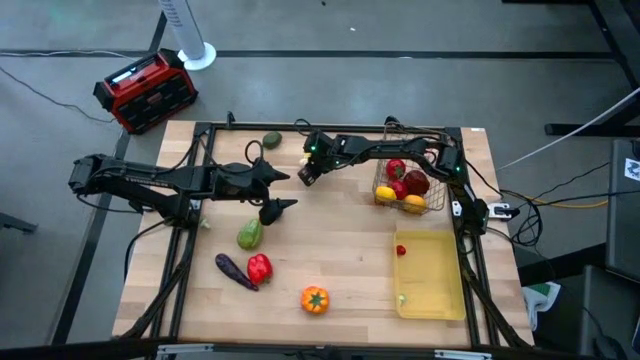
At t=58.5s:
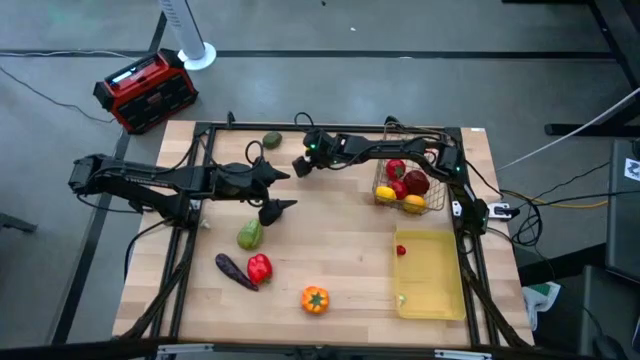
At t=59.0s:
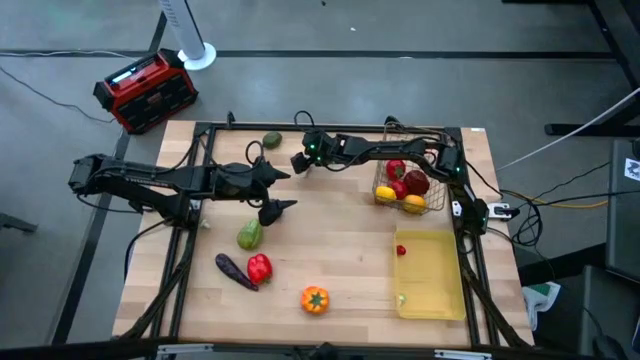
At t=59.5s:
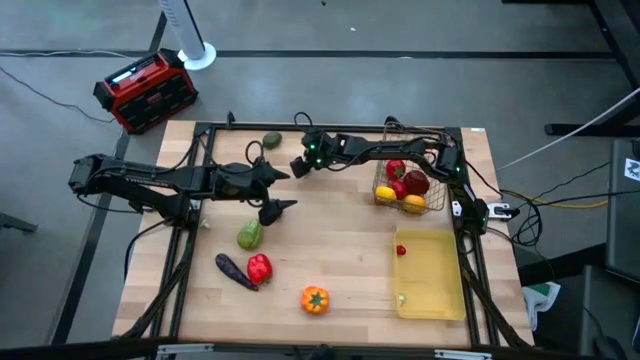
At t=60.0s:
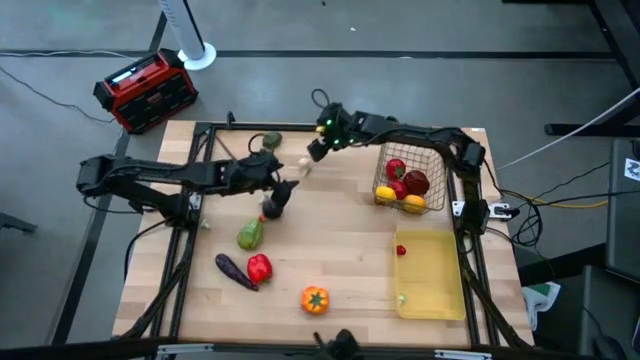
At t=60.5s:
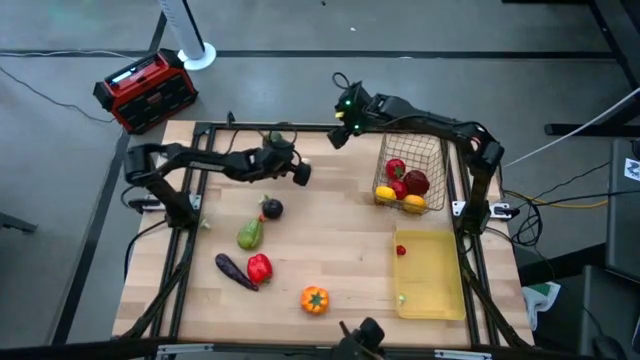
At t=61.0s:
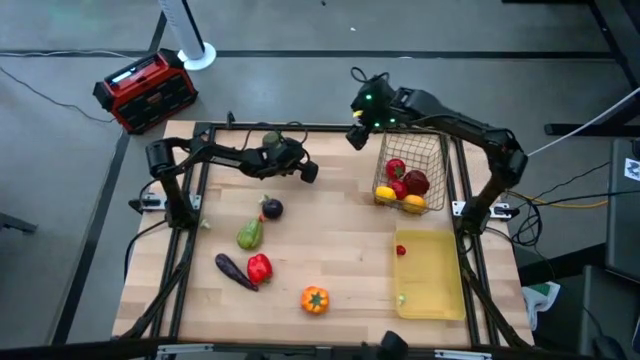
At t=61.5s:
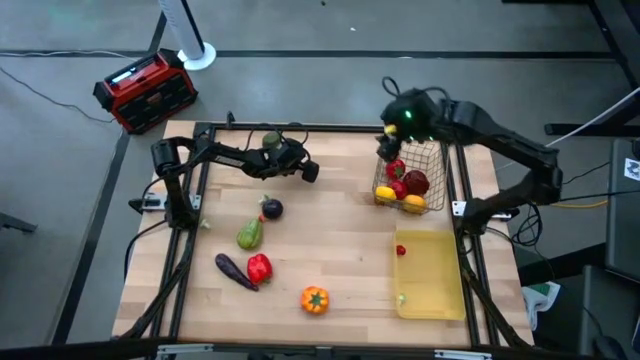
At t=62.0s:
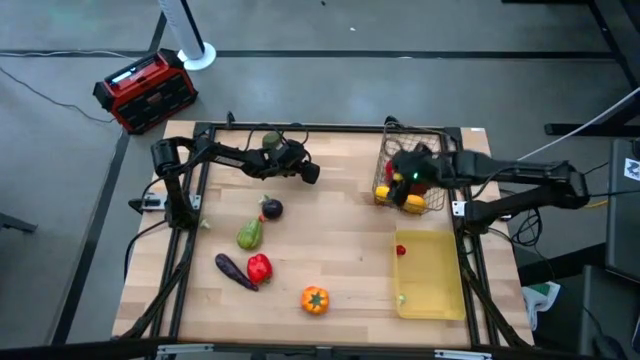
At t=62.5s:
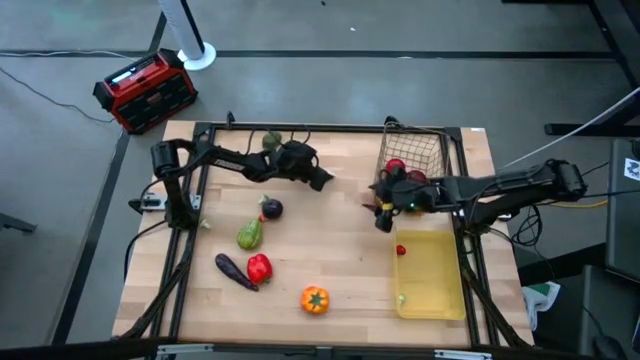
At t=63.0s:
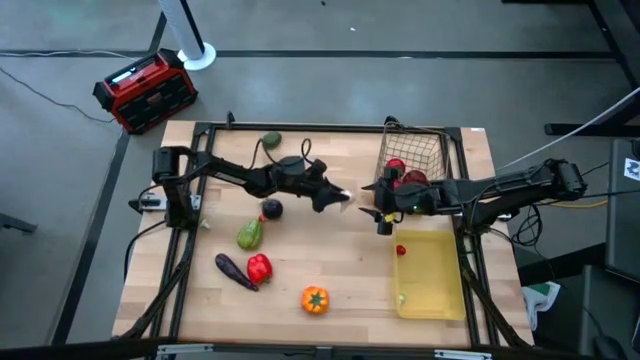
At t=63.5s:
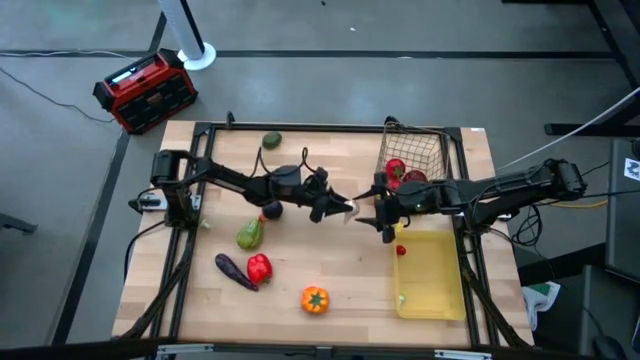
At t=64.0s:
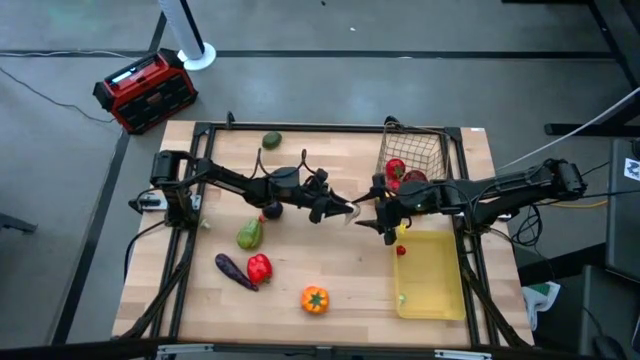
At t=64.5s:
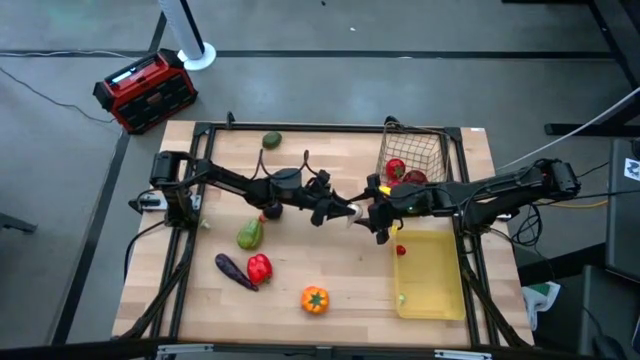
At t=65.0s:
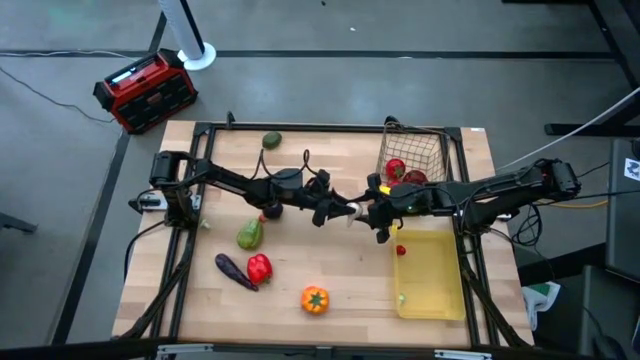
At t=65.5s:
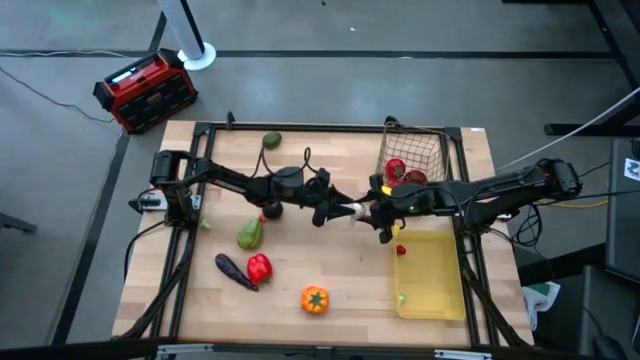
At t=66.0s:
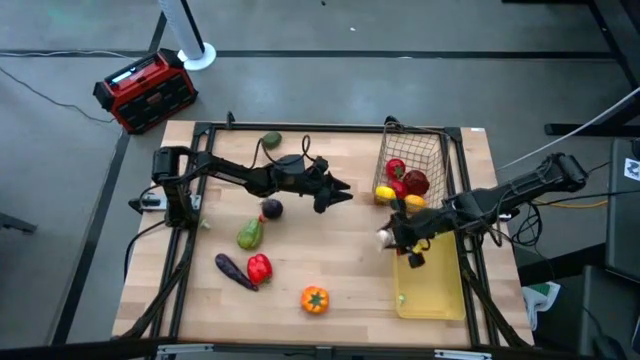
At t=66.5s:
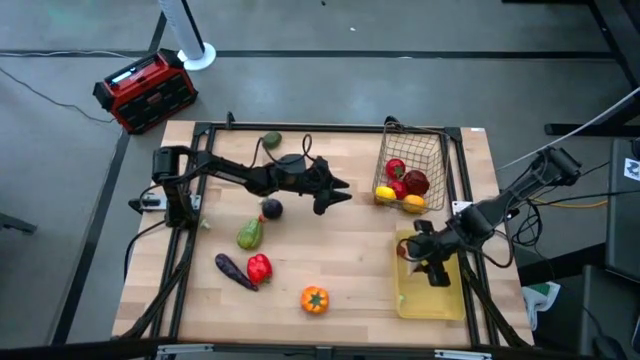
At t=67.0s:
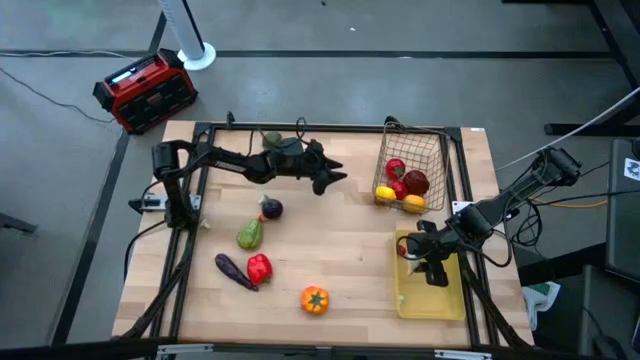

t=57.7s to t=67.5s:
Task: Sort produce into baskets
Put the garlic into the yellow bin

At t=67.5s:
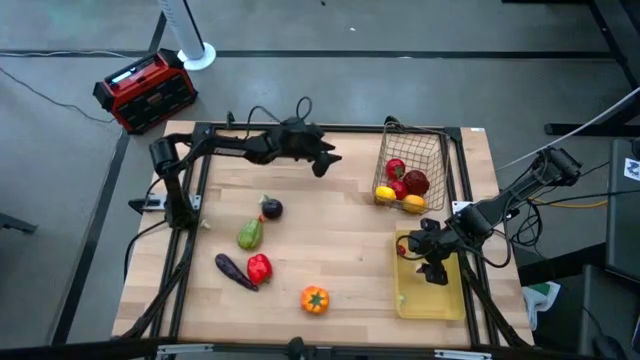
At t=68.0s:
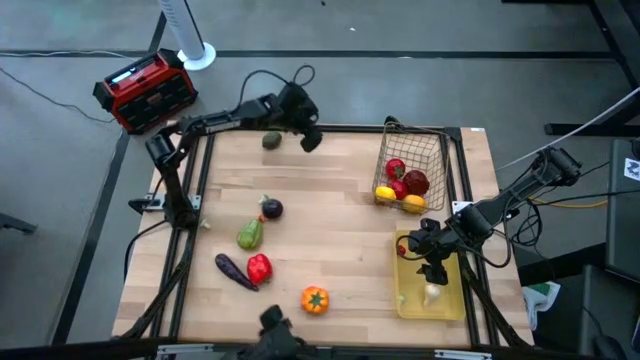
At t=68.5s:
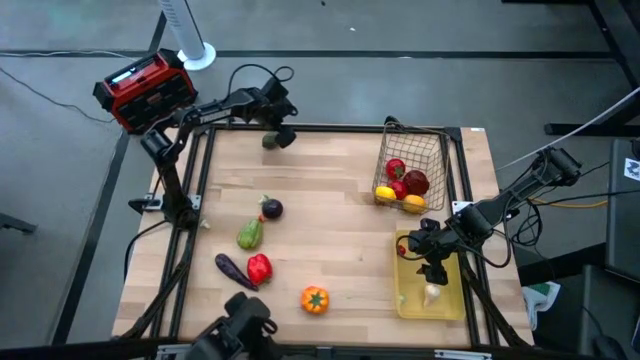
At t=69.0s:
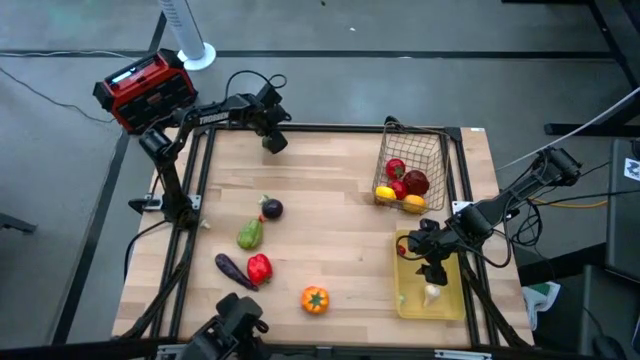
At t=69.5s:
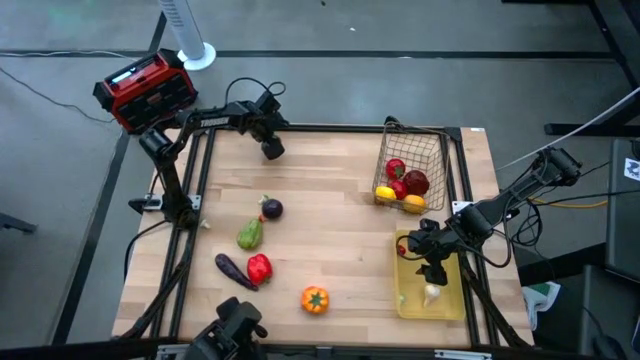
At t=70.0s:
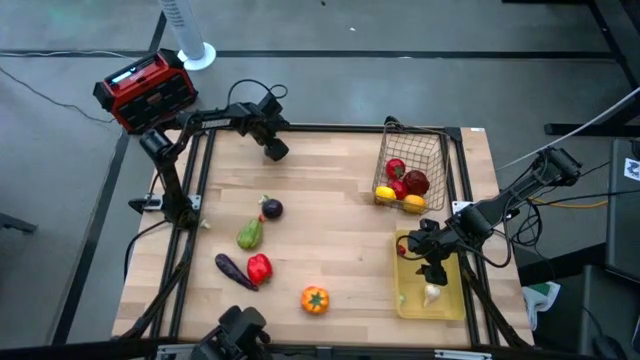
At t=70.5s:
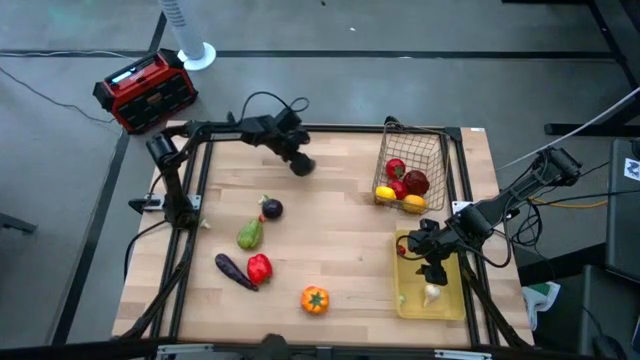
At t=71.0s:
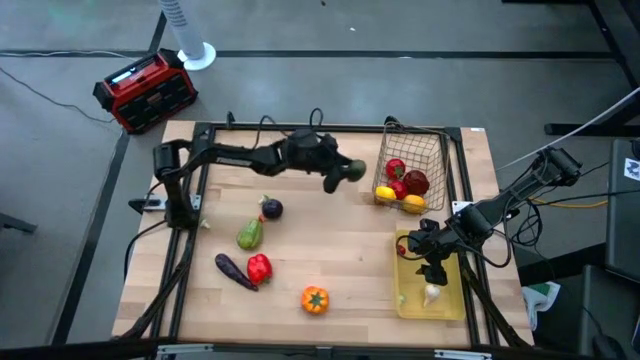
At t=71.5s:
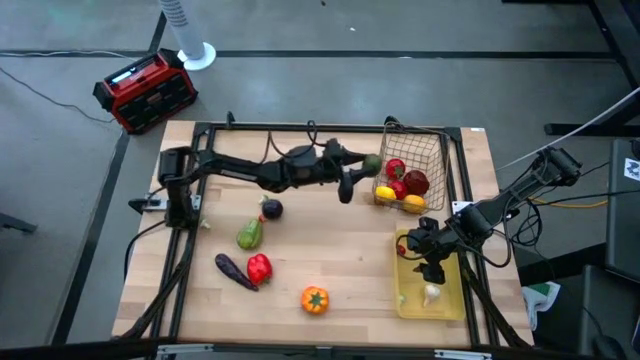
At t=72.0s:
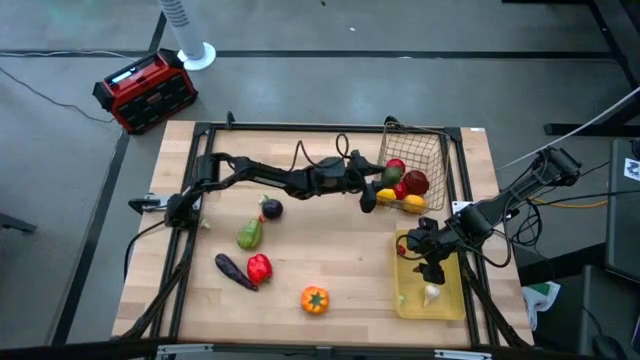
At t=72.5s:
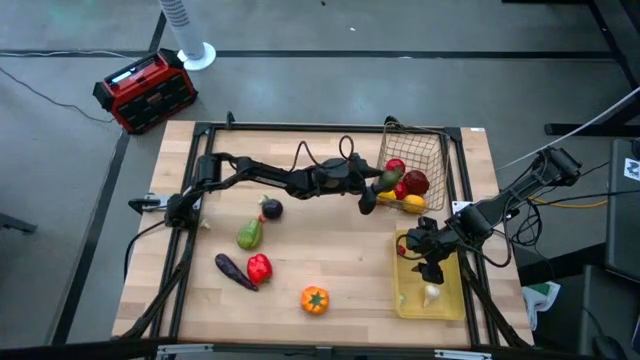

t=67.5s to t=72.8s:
Put the lime into the wired bin

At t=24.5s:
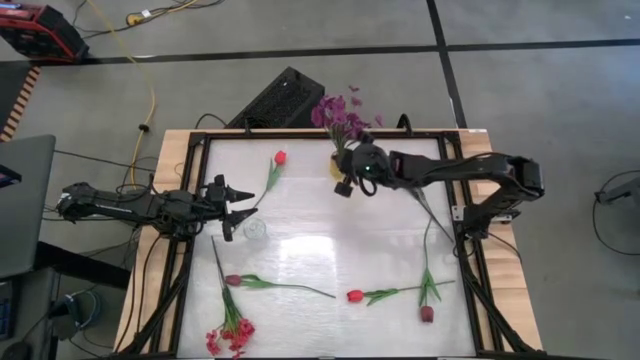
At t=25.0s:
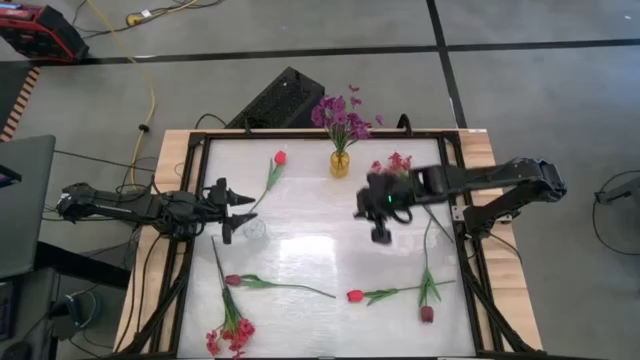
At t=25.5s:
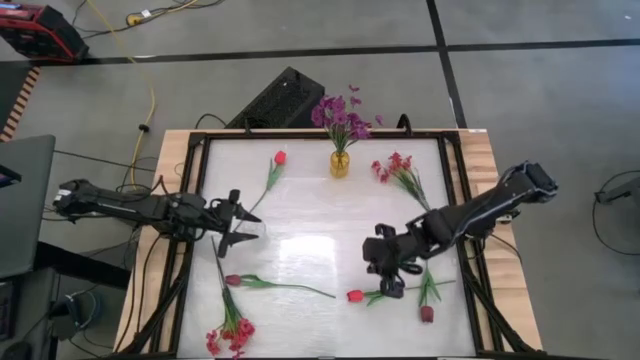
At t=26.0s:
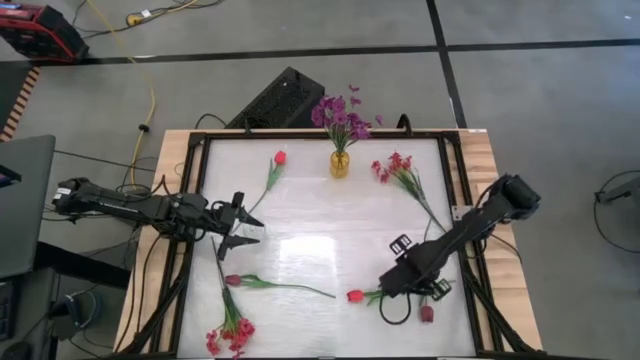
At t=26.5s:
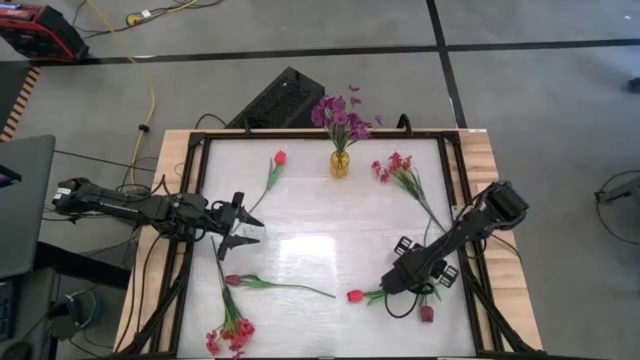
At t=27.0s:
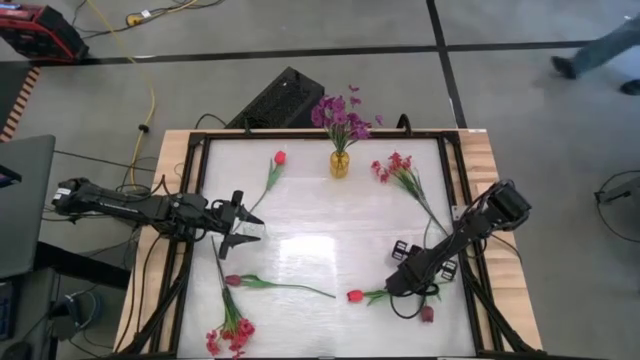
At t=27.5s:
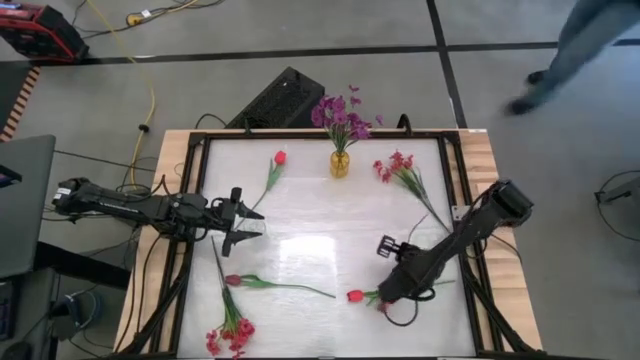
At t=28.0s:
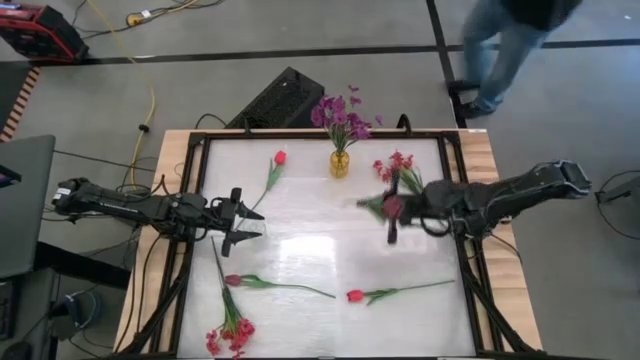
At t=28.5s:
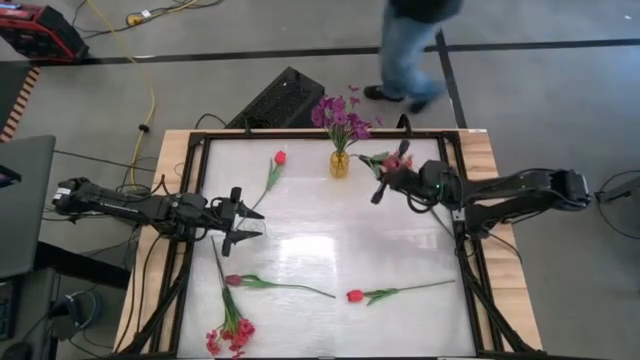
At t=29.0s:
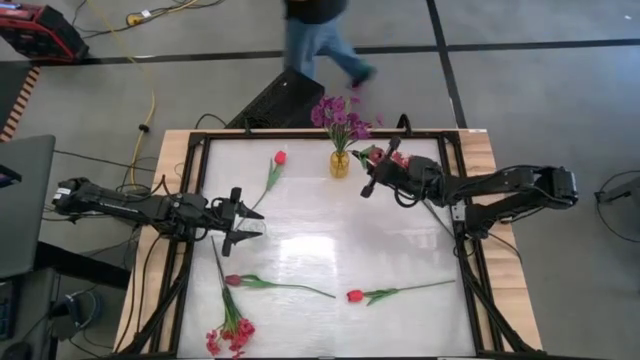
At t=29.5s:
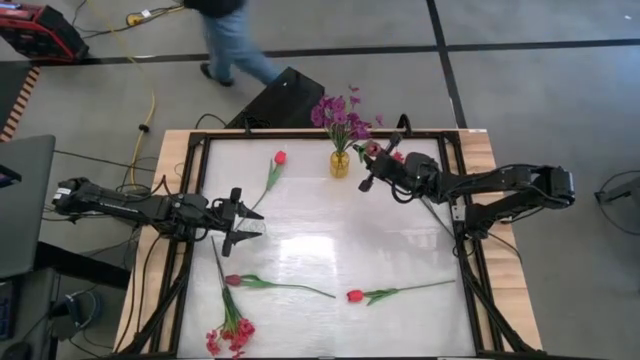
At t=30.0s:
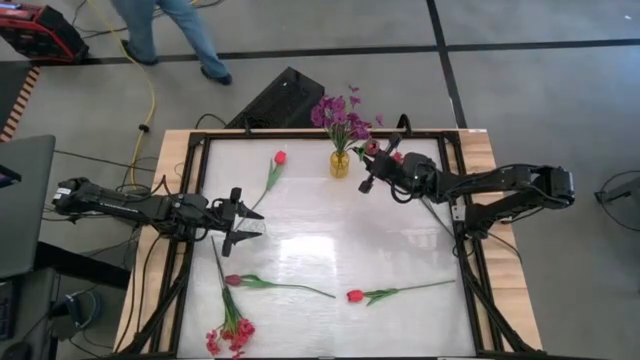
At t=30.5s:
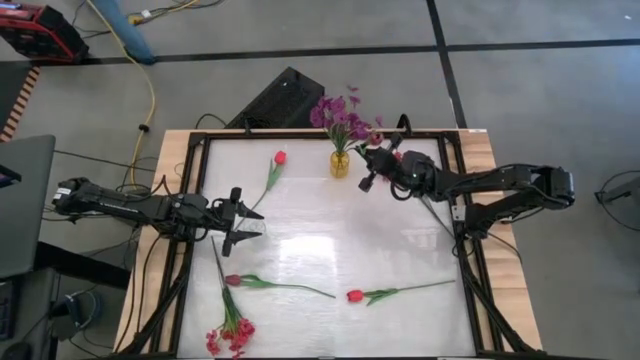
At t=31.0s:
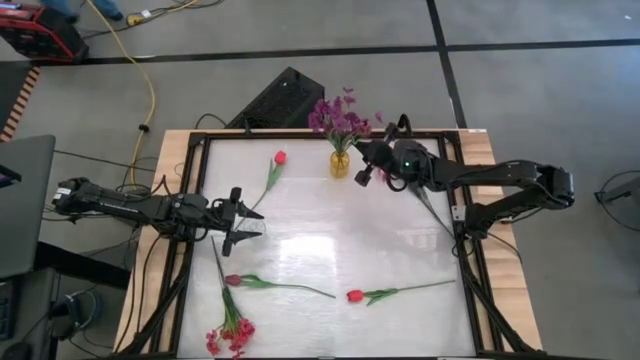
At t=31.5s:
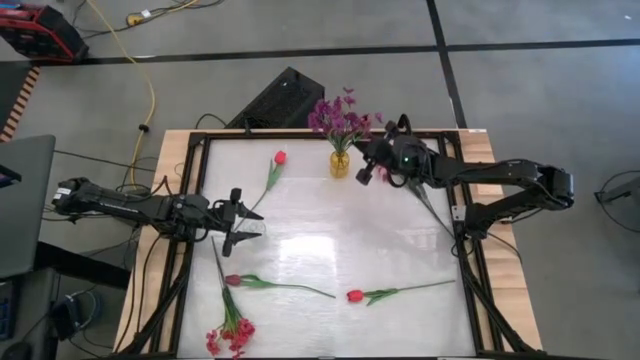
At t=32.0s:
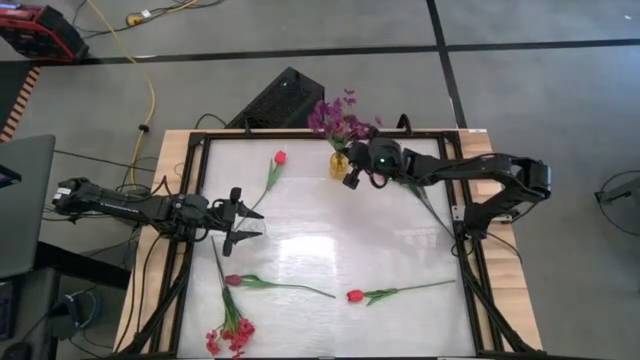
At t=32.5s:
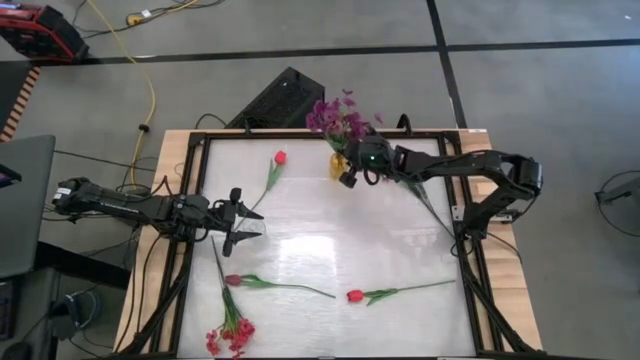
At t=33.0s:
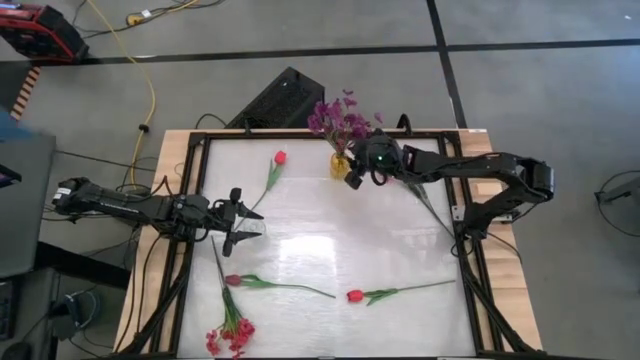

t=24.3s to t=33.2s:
Task: Sort flowers into vase by color
Put the right violet flower into the yellow vase
